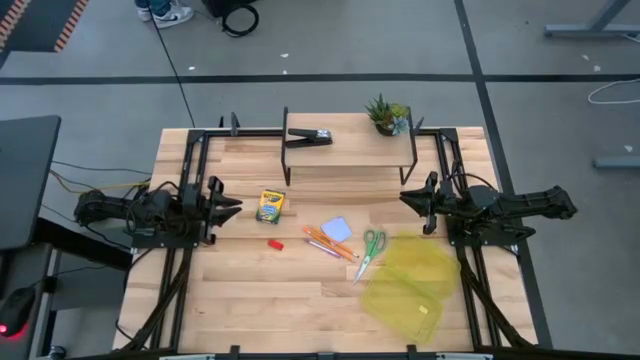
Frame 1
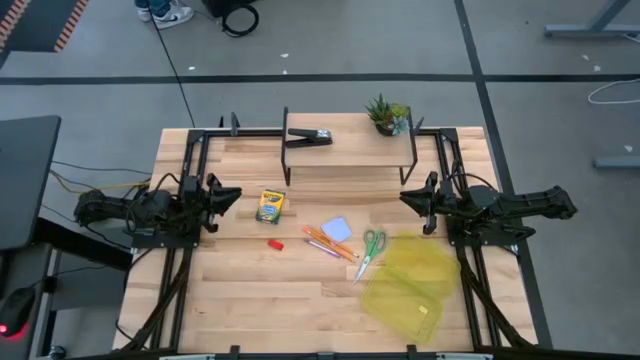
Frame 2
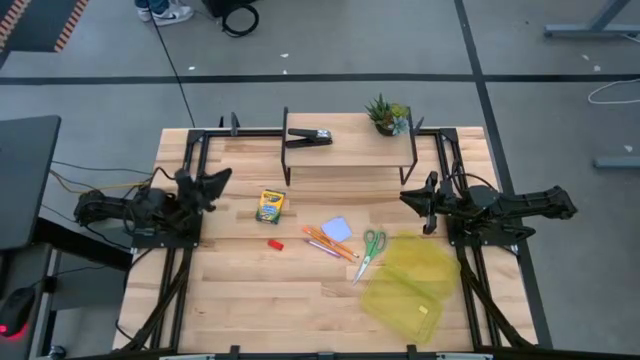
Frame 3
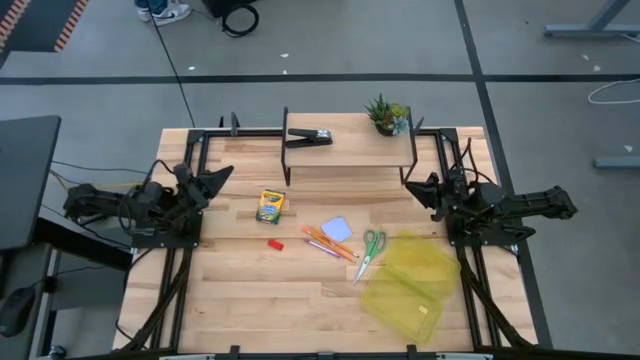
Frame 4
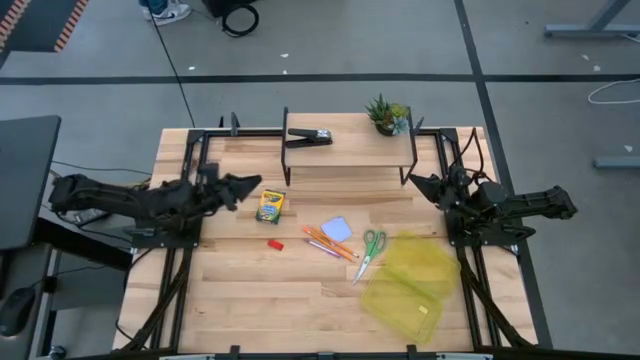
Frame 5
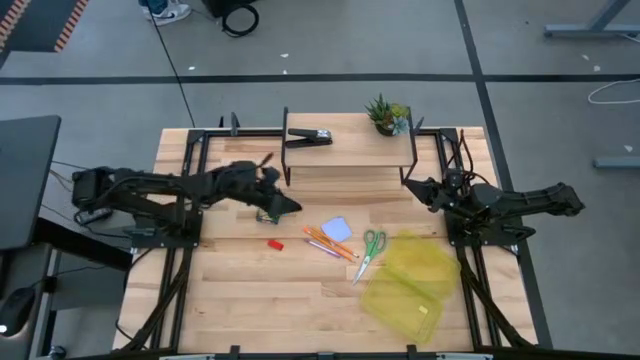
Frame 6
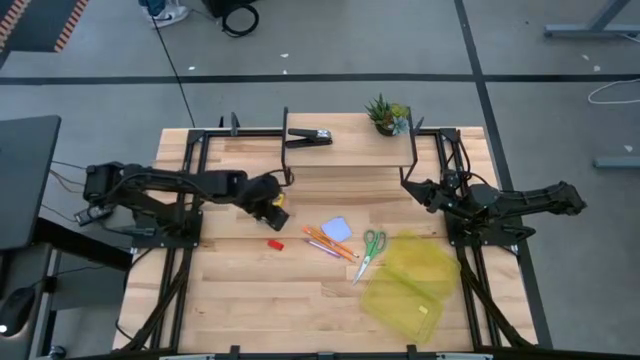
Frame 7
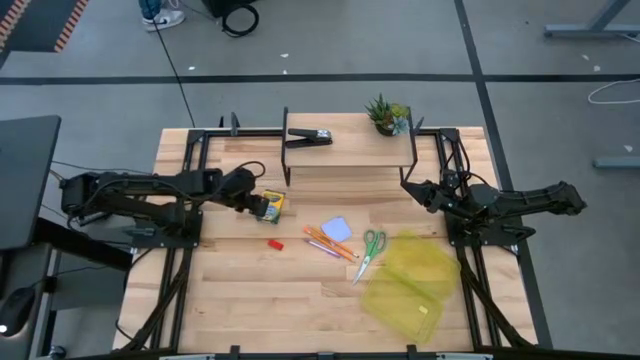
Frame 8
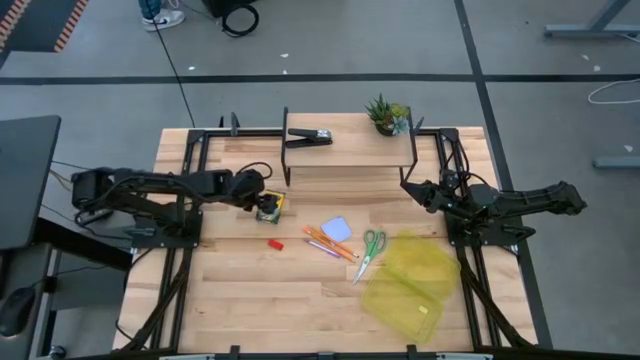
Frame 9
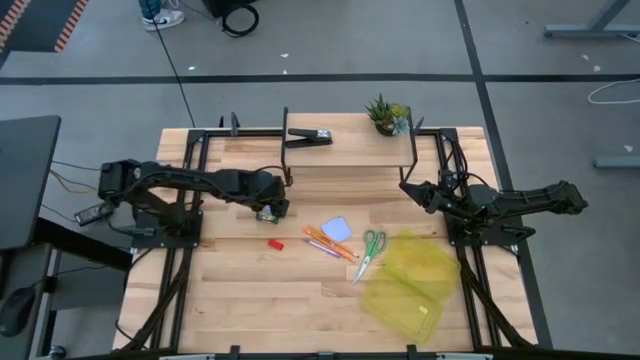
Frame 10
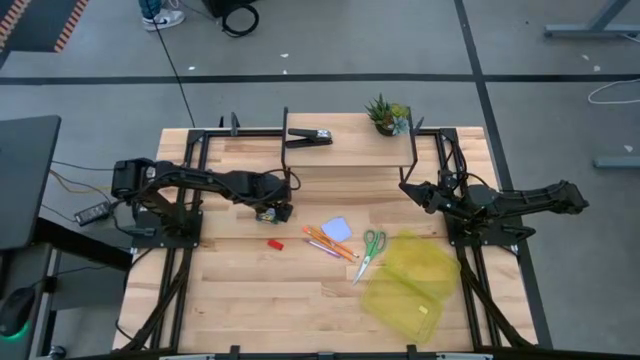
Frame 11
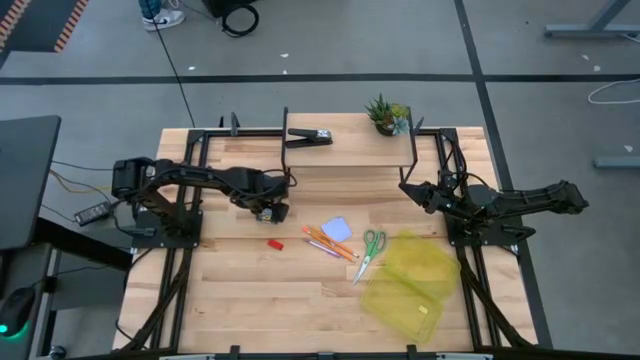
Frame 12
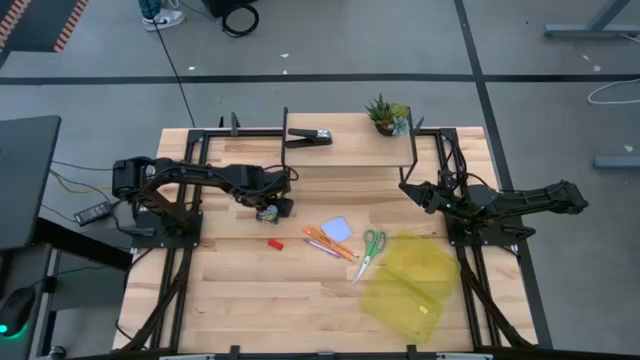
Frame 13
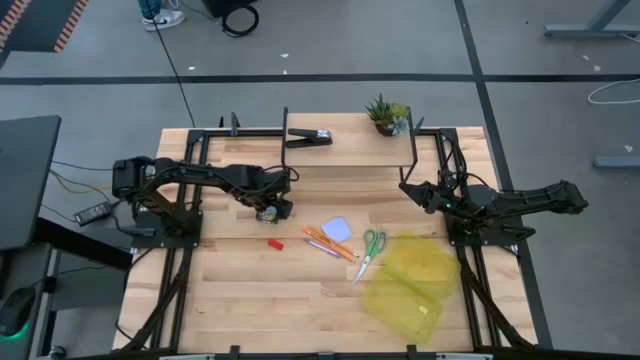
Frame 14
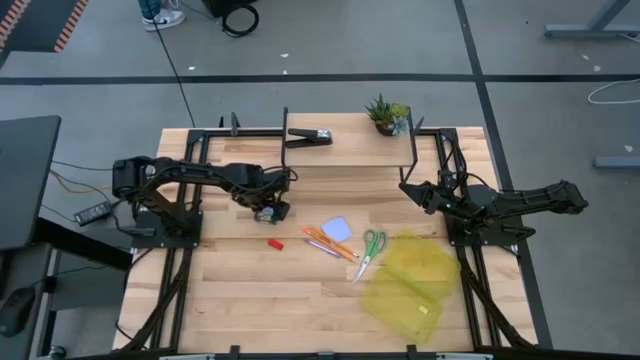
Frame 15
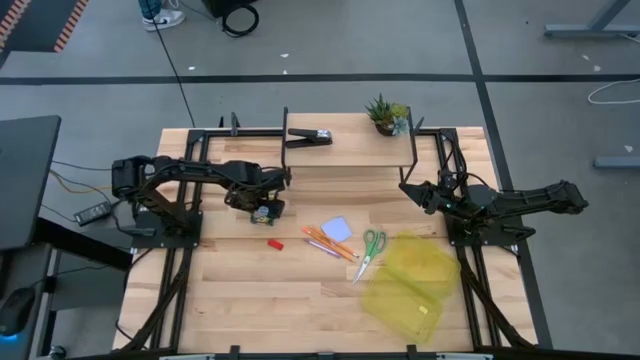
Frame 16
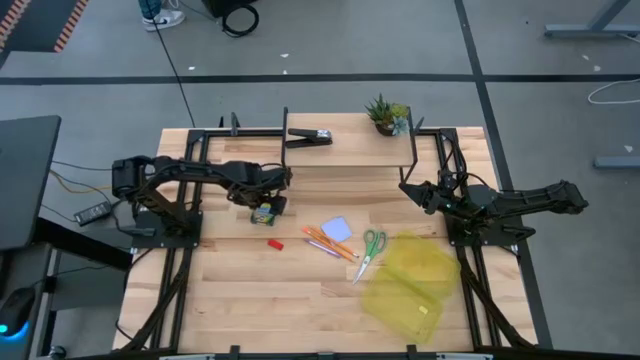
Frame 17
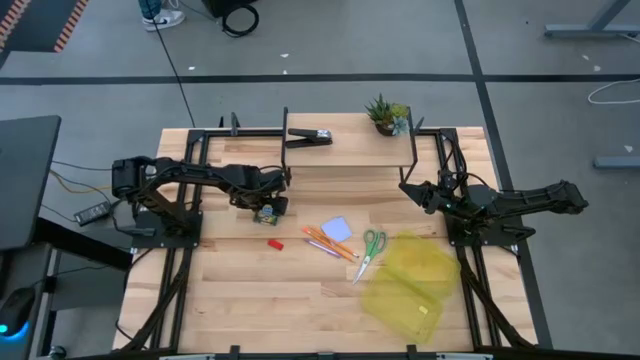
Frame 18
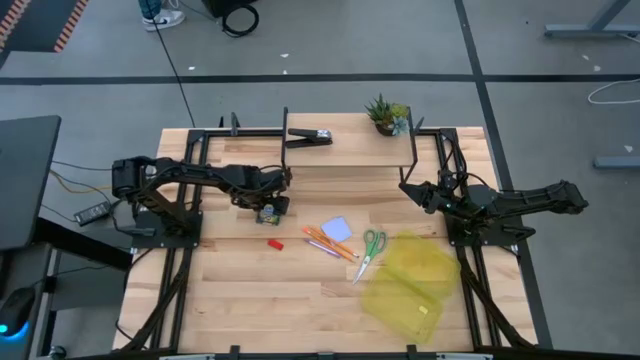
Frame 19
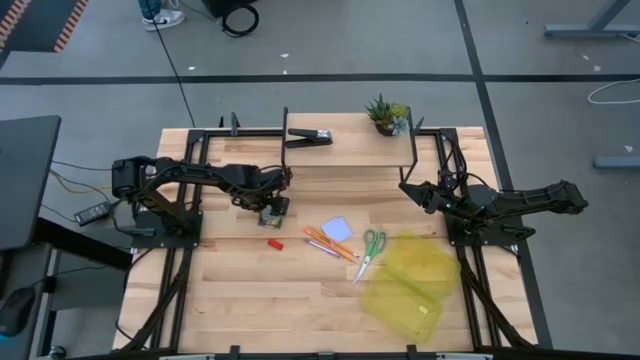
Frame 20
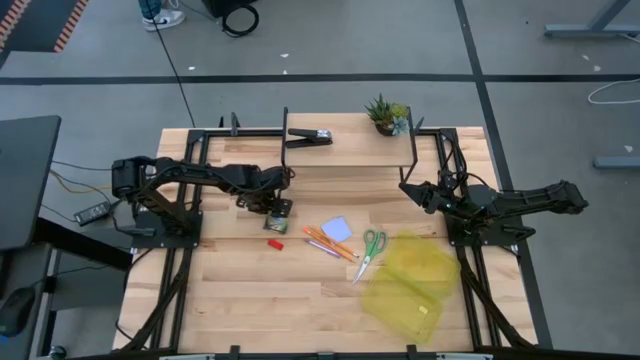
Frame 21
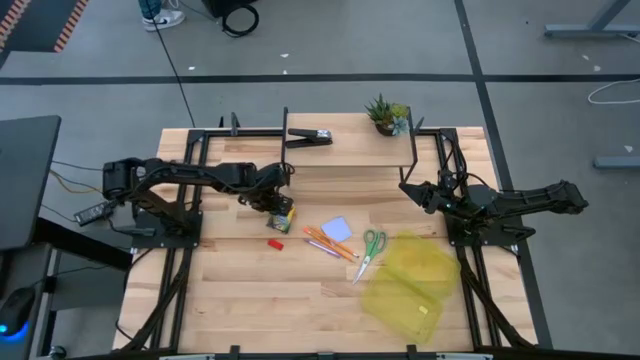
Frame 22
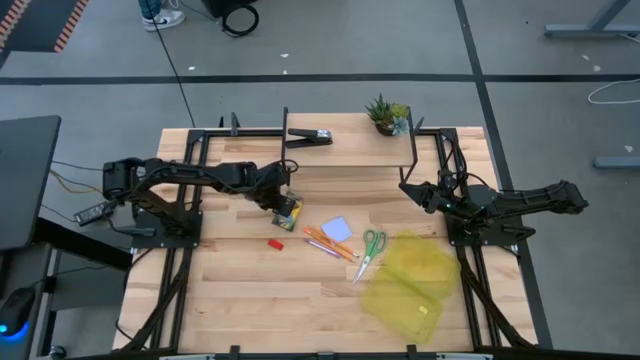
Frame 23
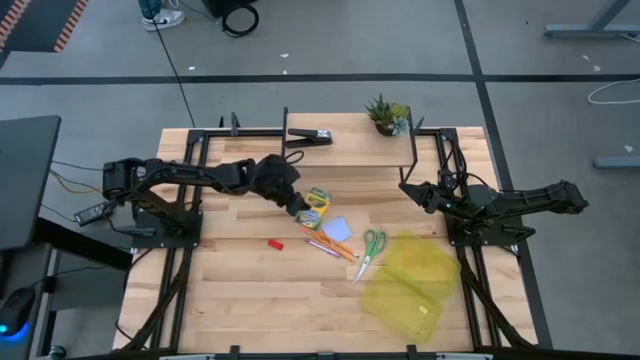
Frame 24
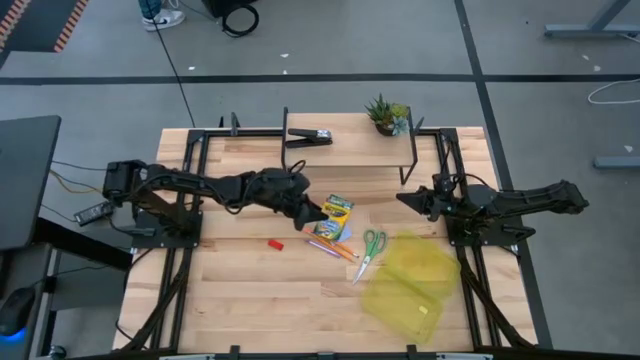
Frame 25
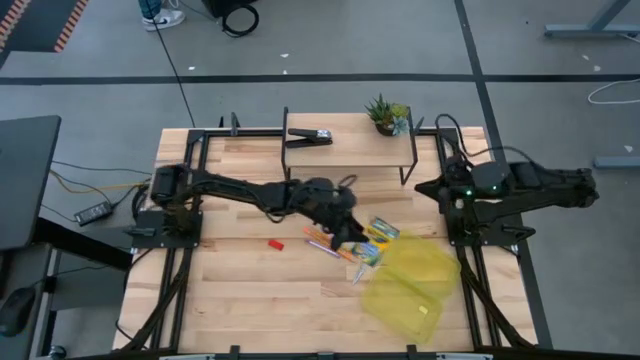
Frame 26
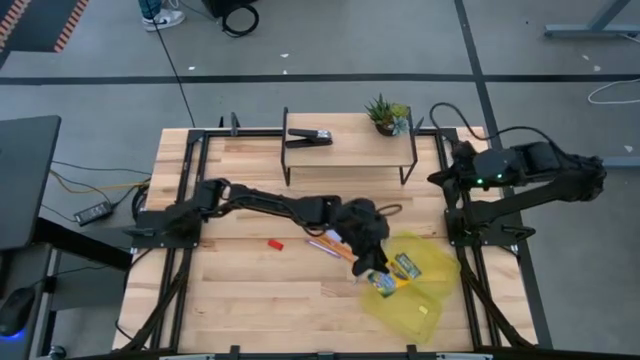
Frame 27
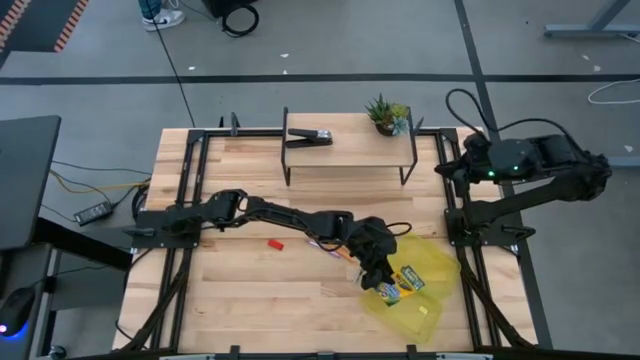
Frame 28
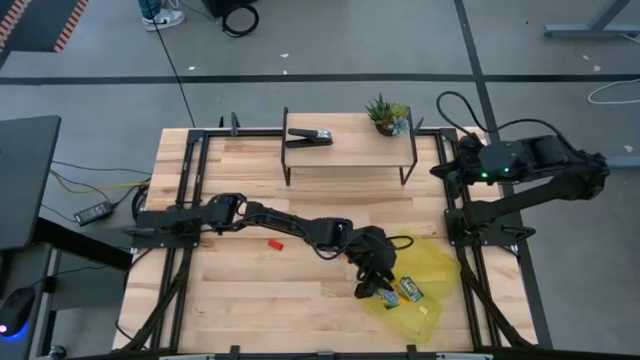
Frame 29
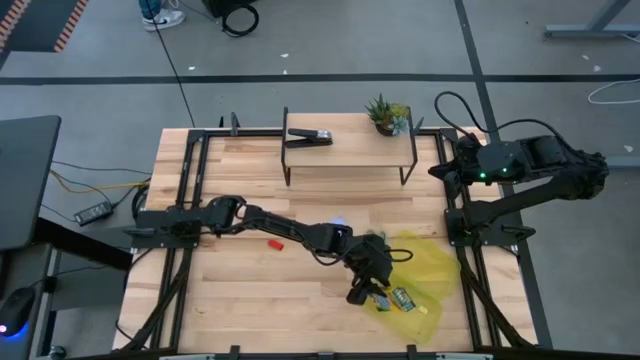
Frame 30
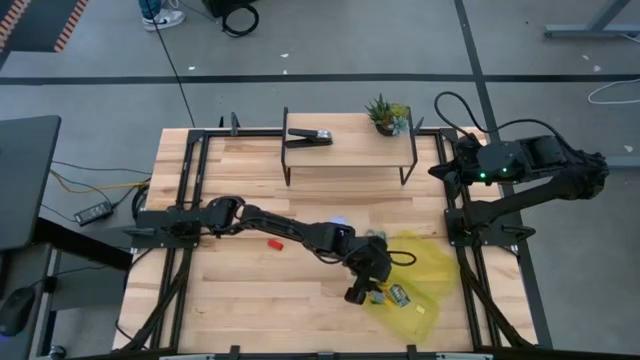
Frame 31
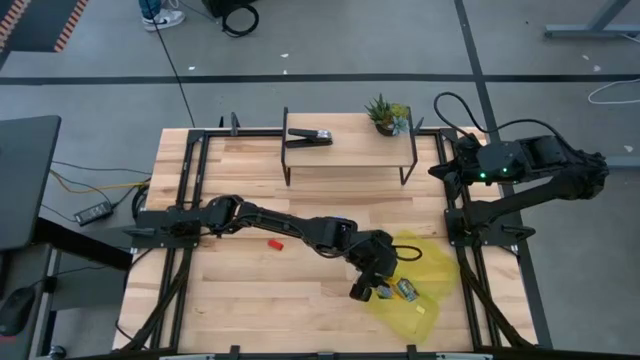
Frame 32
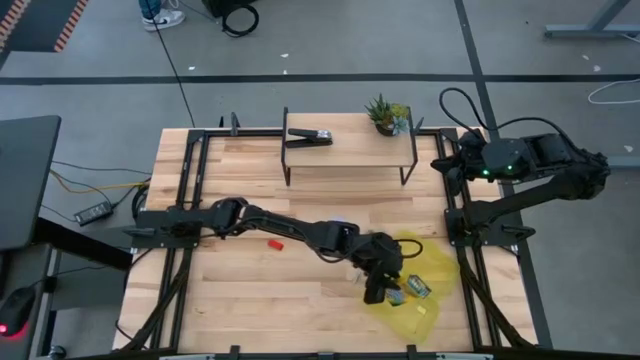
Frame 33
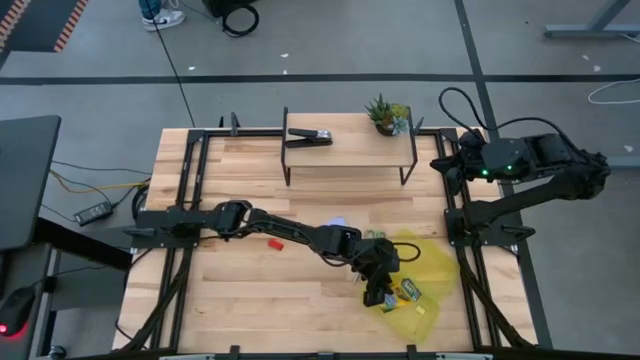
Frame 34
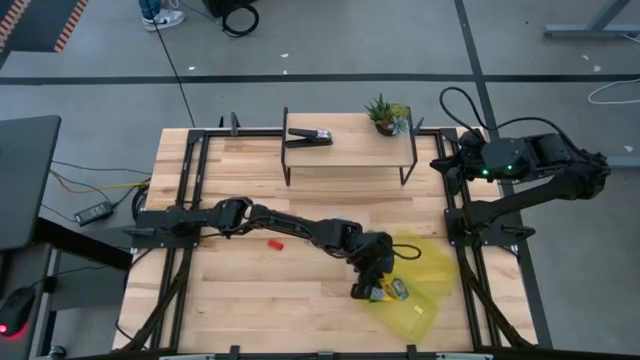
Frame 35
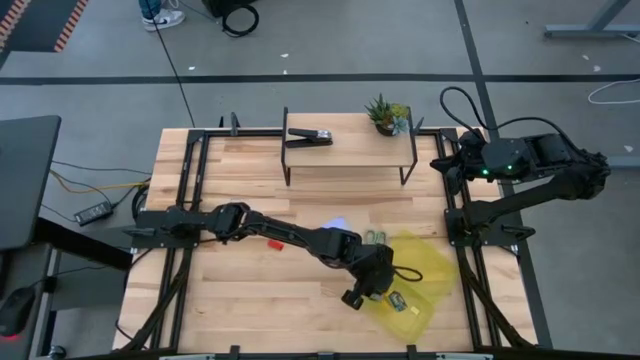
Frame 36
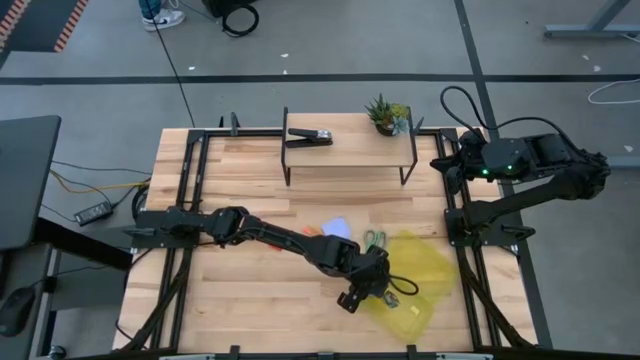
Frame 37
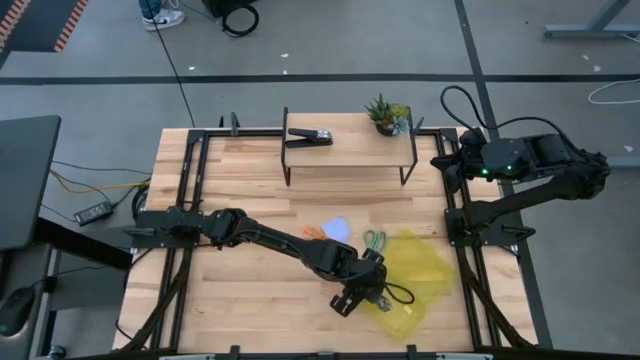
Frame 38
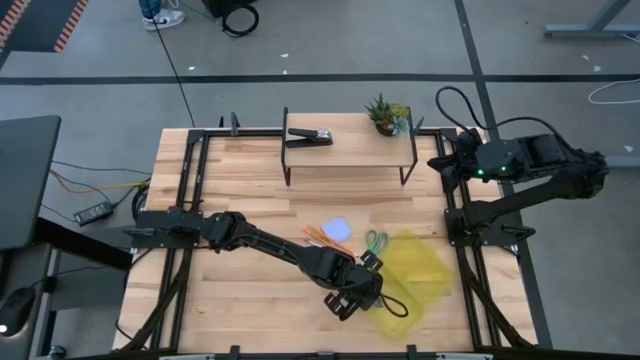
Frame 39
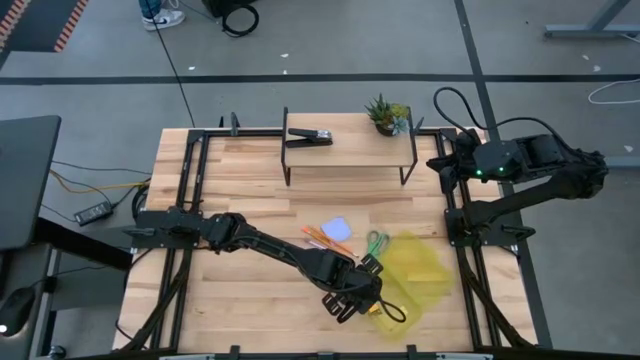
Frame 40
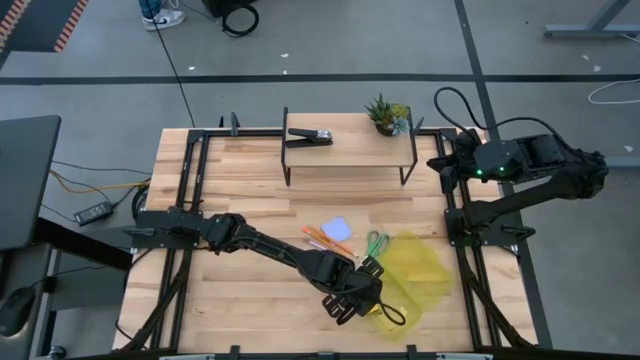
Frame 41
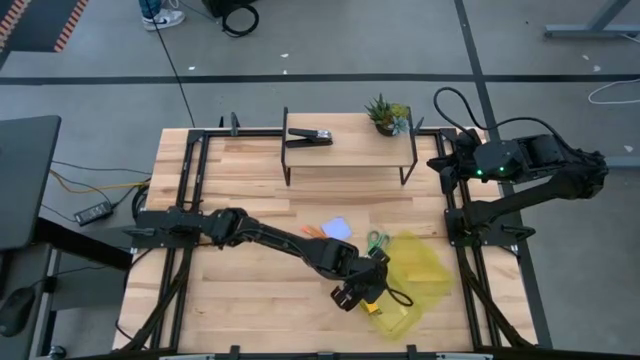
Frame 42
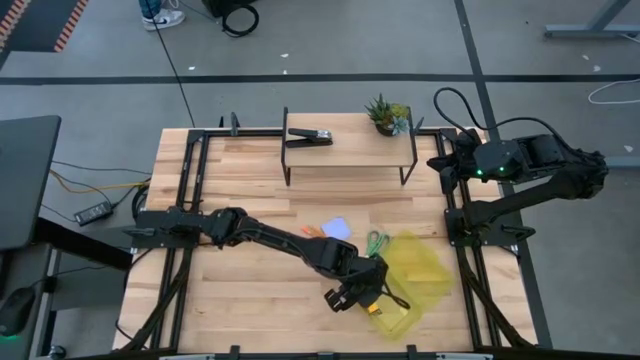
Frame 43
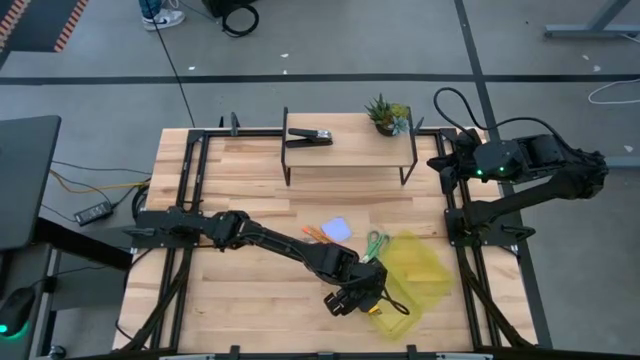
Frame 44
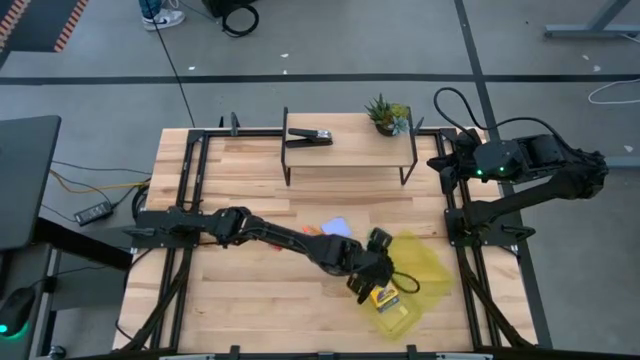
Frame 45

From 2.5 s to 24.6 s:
Task: Pack school essentials
Put the yellow crayon box into the yellow supply box
